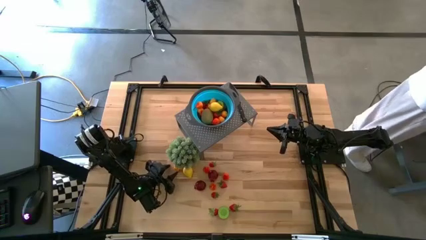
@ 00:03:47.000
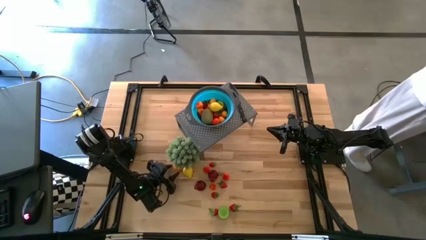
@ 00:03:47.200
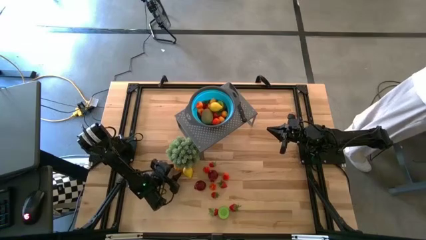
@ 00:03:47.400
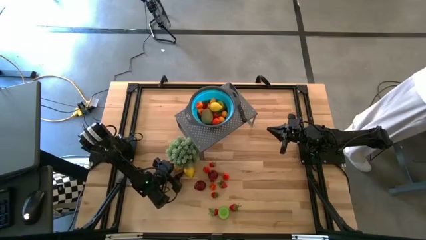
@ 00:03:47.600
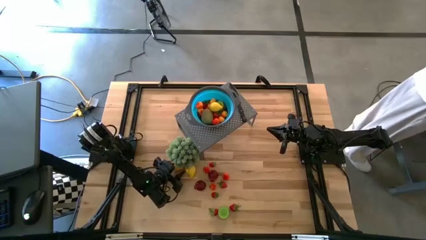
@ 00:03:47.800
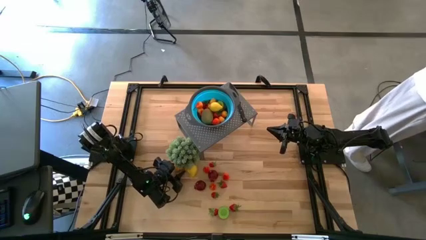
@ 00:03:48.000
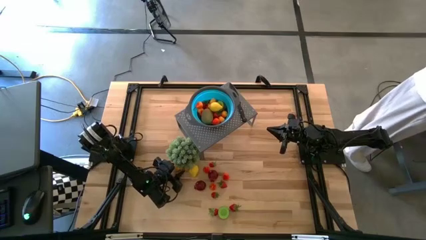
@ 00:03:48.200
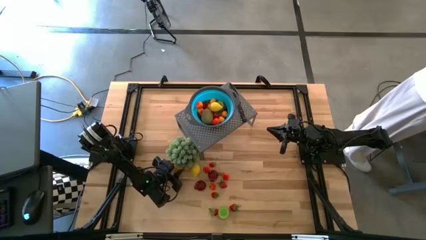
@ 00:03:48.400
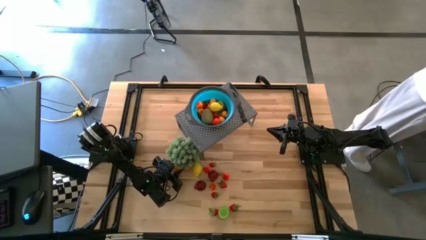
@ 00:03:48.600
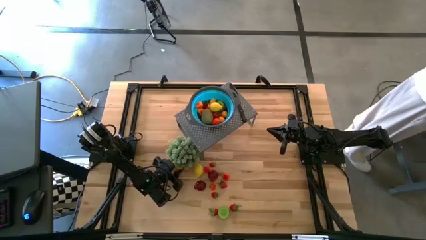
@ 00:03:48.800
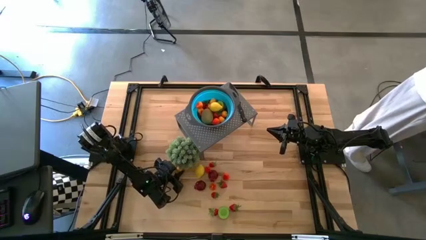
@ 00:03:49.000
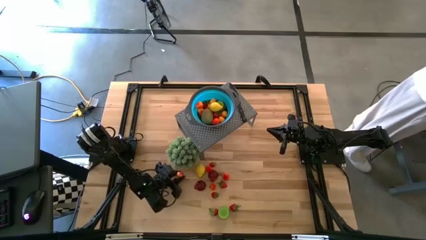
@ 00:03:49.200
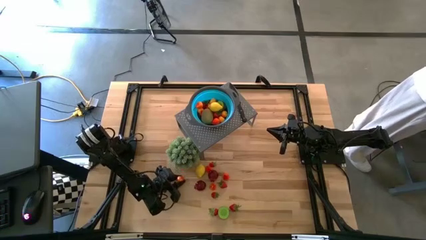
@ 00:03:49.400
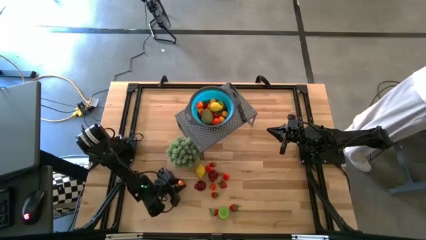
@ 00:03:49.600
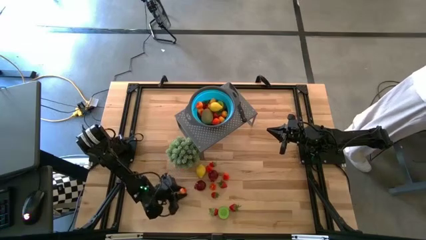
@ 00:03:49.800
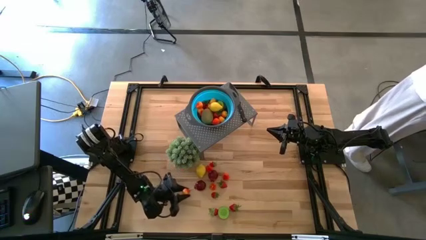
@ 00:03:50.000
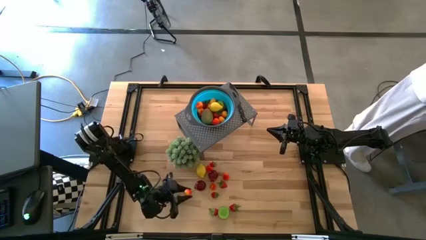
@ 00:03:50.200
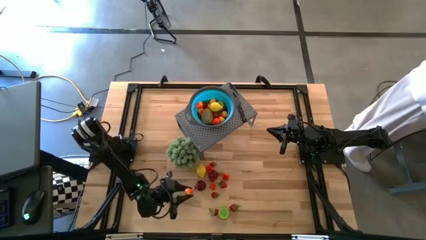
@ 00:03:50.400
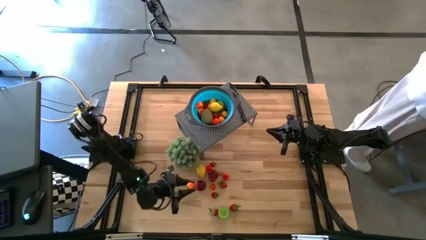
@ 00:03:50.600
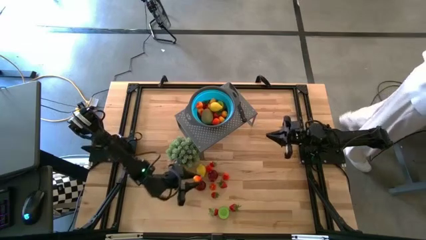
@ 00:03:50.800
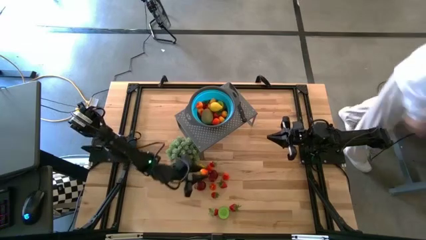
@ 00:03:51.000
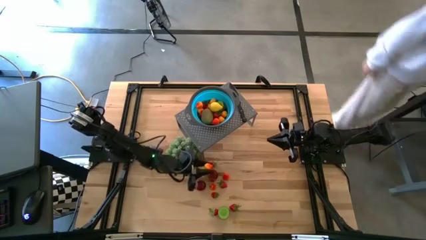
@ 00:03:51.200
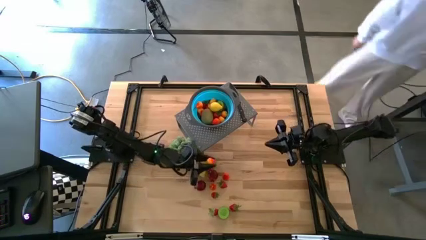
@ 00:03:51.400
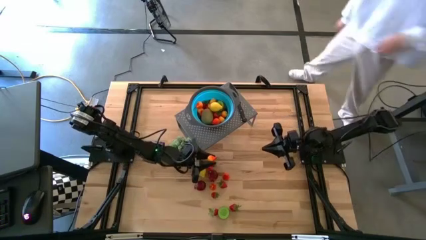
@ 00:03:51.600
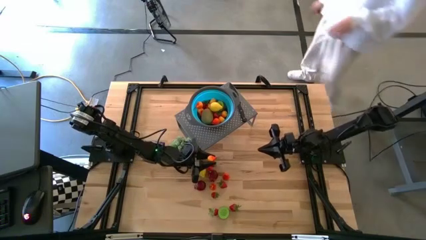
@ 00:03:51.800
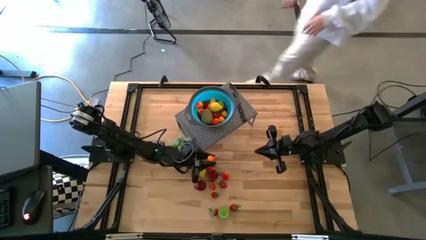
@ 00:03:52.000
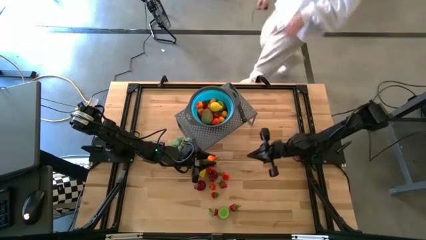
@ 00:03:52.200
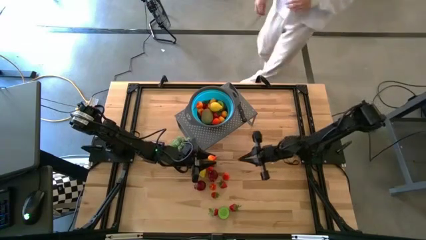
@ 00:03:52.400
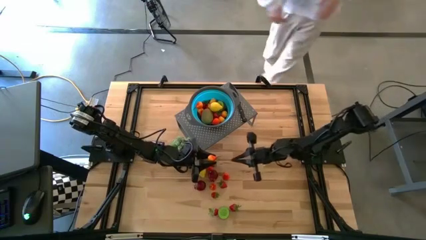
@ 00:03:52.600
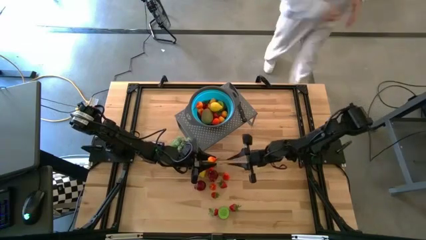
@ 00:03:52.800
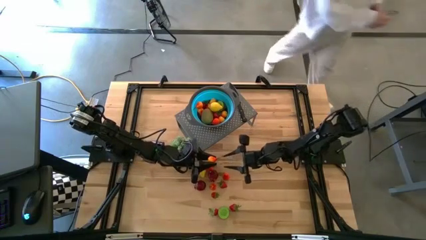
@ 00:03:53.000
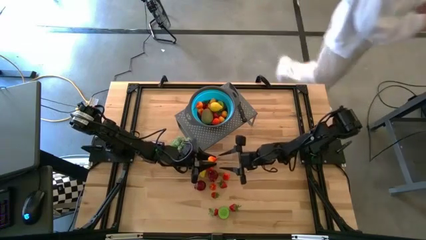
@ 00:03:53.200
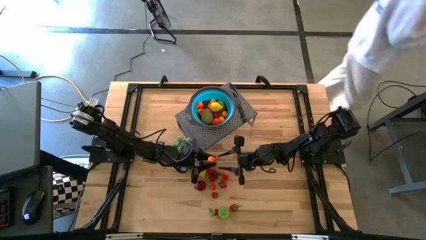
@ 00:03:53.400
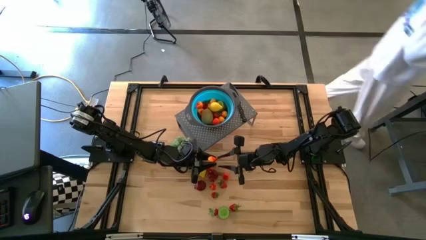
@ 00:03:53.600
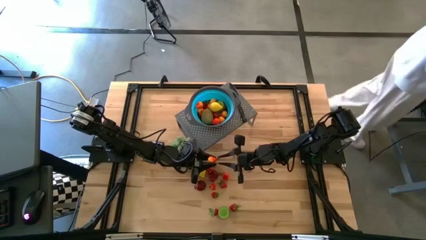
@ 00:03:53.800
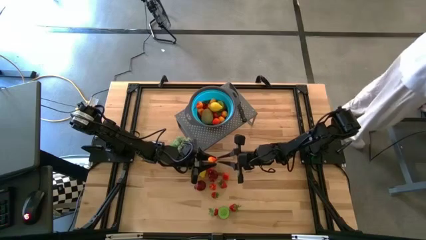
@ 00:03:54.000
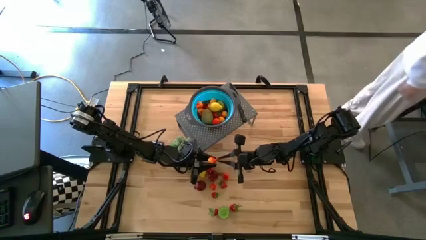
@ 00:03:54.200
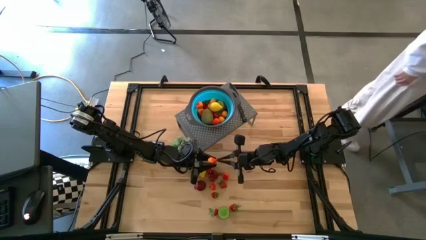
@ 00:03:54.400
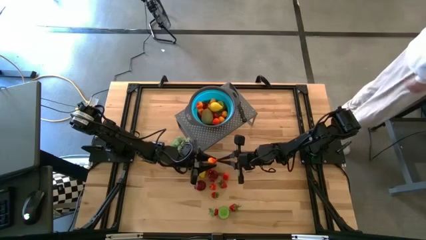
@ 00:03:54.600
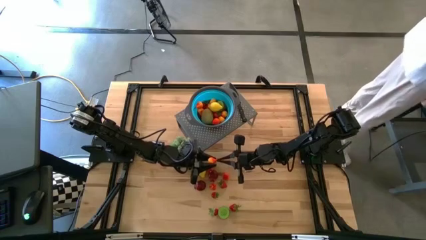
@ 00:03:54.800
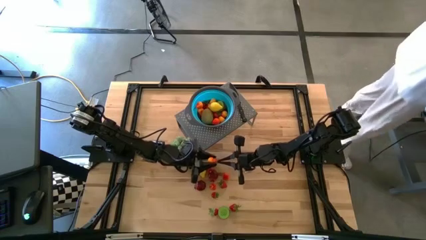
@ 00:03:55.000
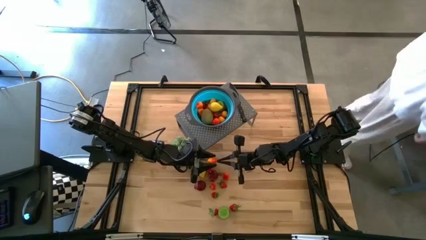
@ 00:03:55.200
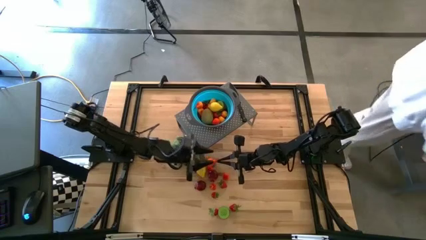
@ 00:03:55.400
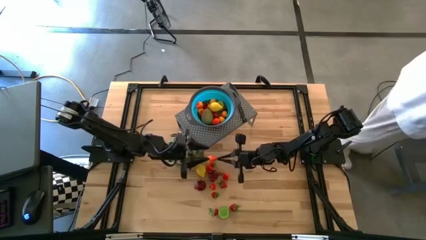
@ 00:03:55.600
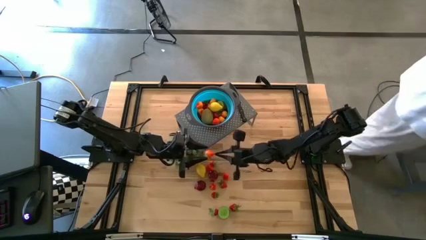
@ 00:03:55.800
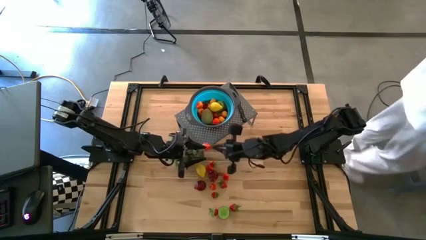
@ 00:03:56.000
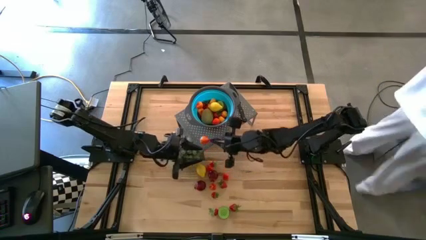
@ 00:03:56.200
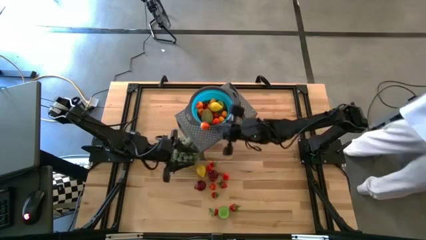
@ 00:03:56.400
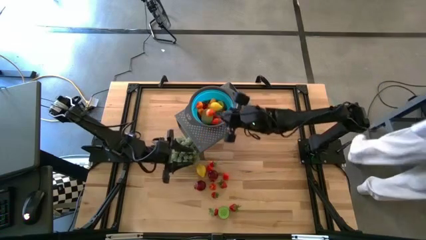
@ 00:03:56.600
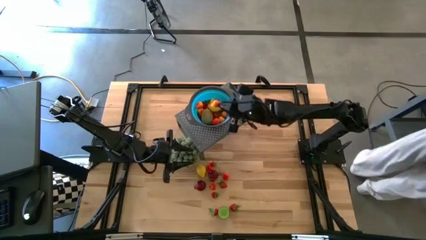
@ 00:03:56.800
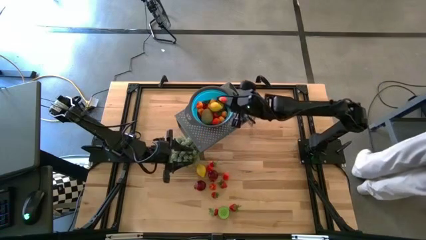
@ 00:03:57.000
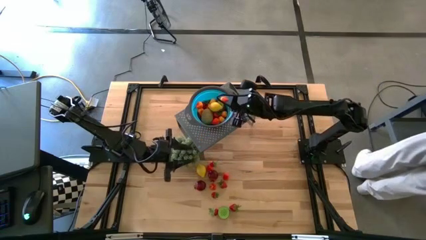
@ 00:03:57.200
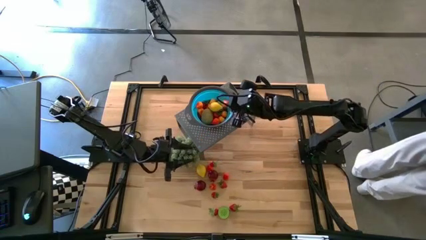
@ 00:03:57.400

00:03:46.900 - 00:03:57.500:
Task: Pick & Place Fruit
Put the pear into the blue strainer bowl on the shelf

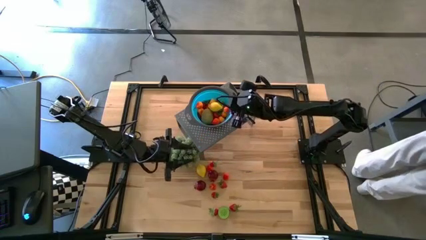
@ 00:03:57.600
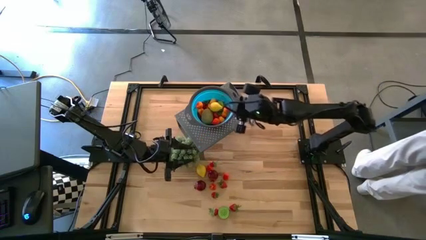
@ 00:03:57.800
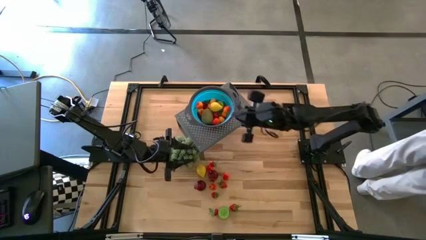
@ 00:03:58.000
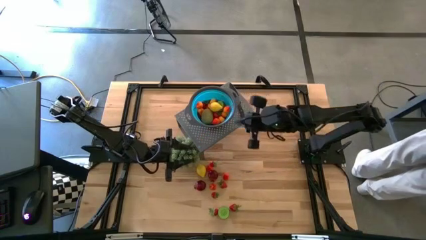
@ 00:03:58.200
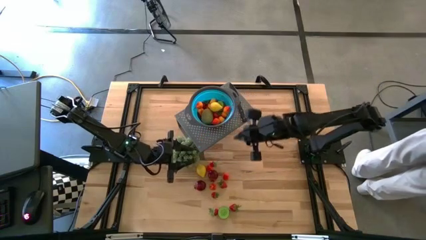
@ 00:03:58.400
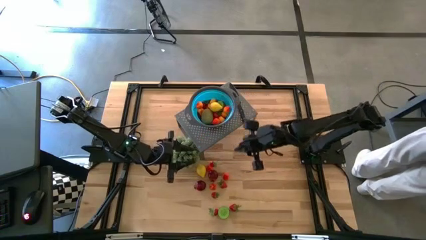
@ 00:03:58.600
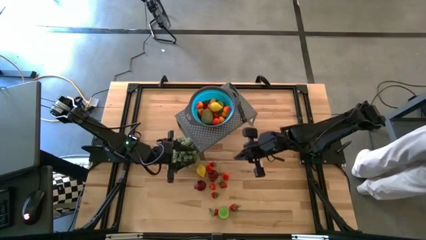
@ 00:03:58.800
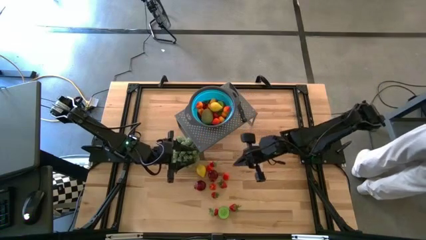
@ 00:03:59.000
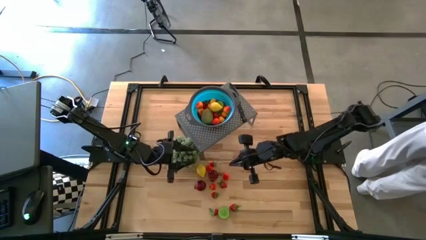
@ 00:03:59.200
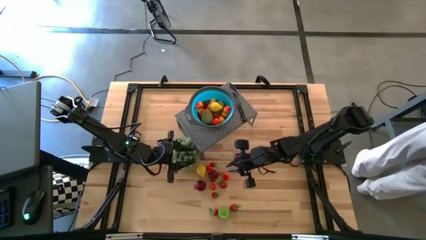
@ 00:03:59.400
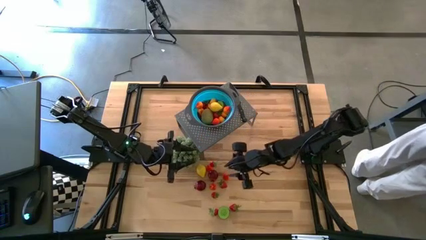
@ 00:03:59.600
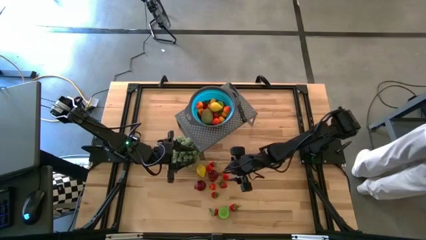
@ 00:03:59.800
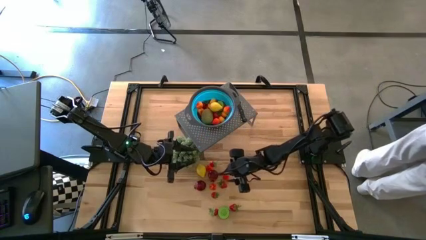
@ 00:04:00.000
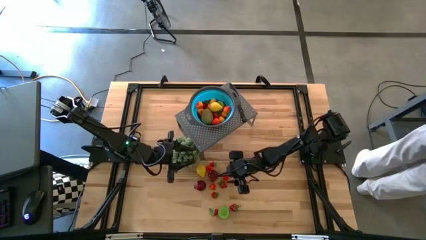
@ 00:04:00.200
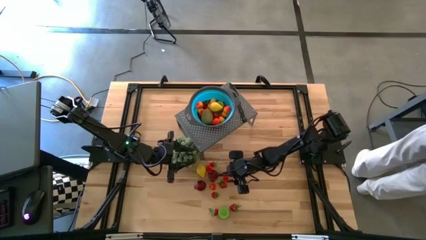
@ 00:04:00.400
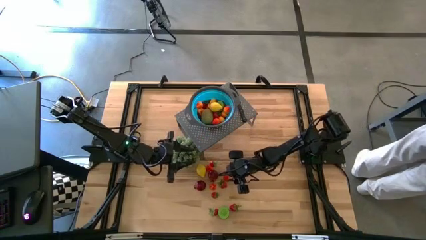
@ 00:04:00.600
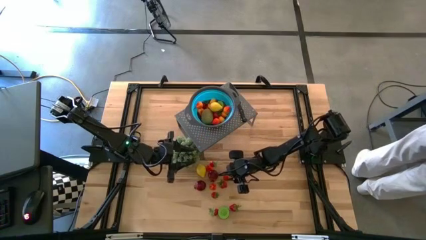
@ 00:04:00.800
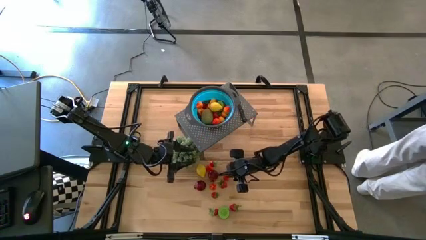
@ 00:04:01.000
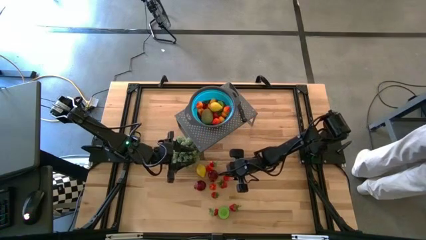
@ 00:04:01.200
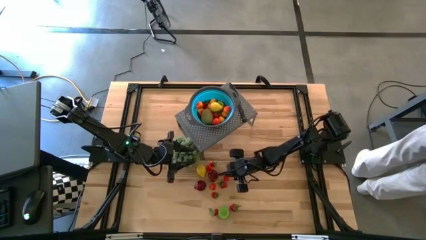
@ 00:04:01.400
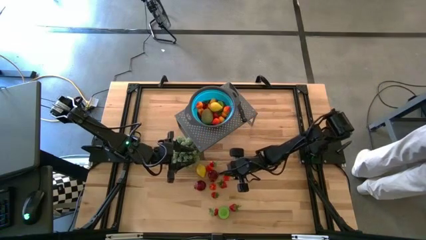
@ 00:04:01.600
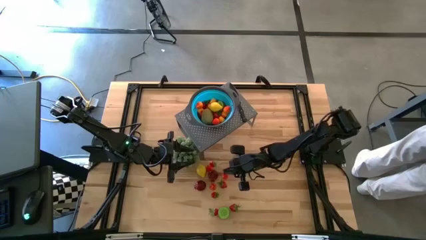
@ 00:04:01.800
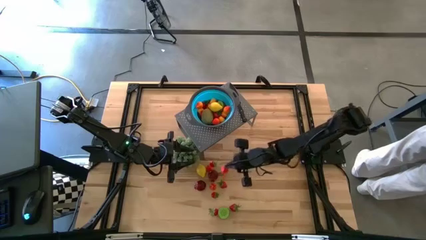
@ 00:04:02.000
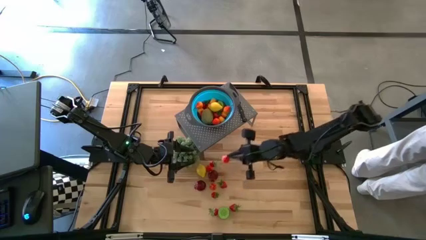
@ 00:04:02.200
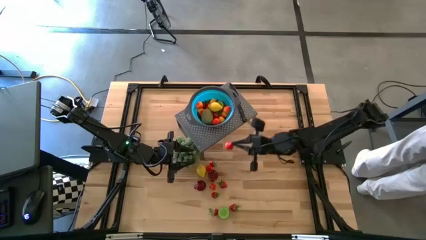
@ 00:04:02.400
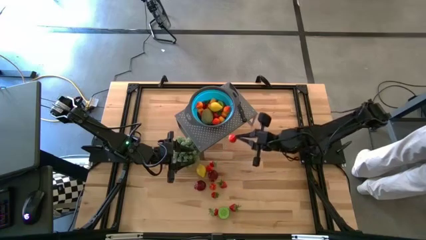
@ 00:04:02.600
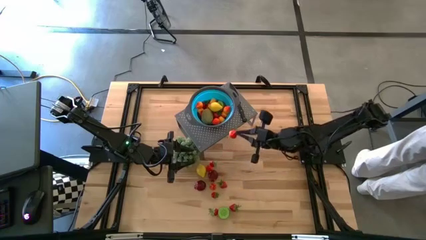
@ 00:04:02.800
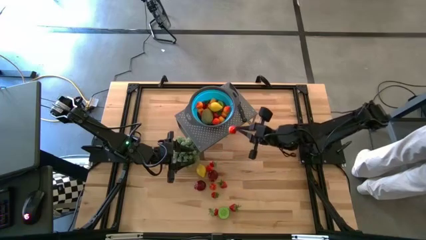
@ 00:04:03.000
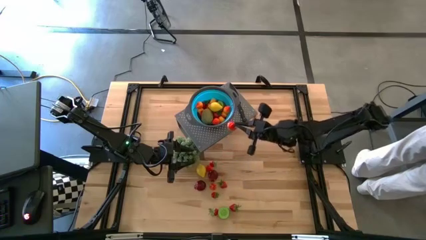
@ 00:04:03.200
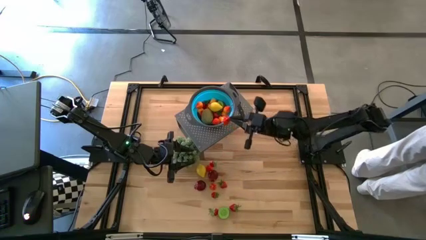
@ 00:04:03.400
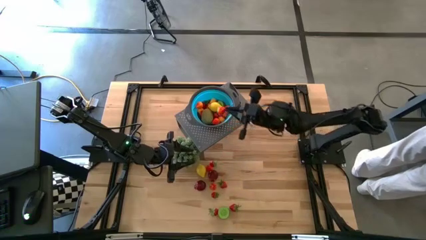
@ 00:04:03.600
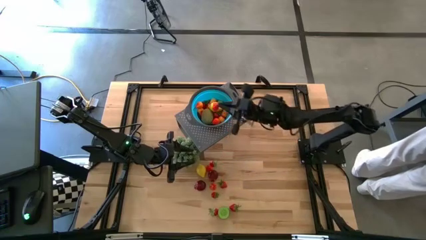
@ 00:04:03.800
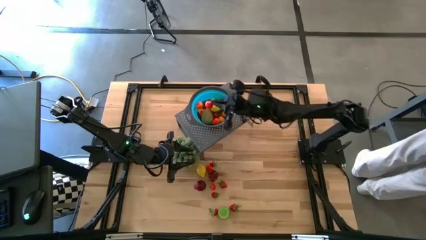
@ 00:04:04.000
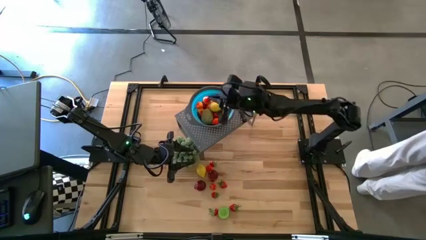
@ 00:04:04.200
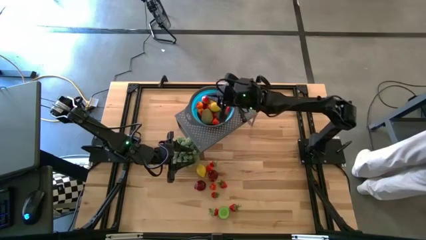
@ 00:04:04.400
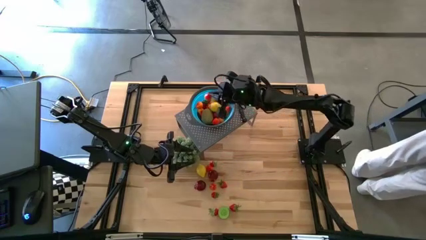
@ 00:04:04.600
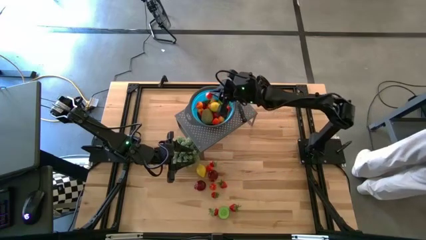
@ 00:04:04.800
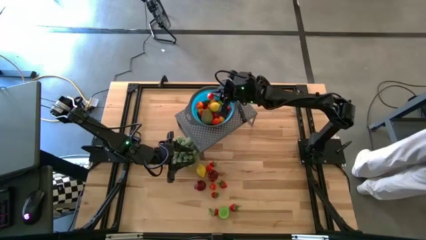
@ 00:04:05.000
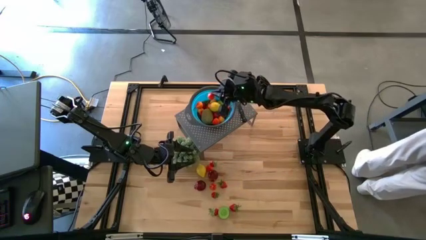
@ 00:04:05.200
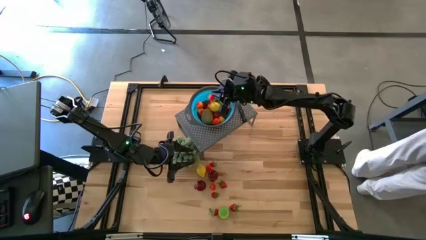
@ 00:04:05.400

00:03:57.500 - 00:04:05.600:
Put the pear into the blue strainer bowl on the shelf
